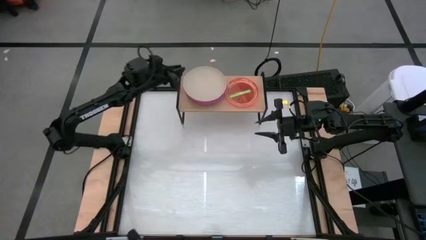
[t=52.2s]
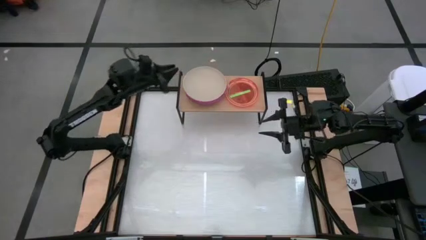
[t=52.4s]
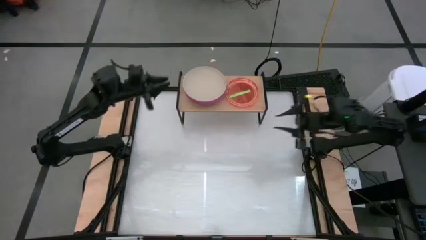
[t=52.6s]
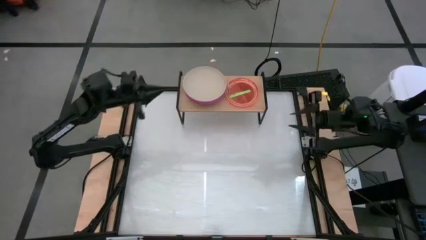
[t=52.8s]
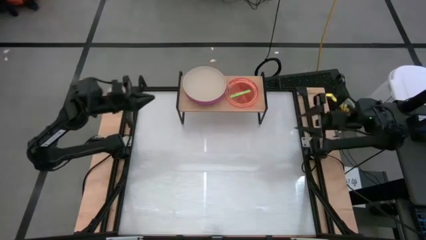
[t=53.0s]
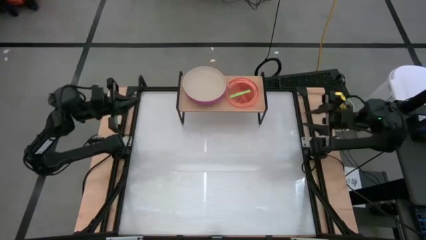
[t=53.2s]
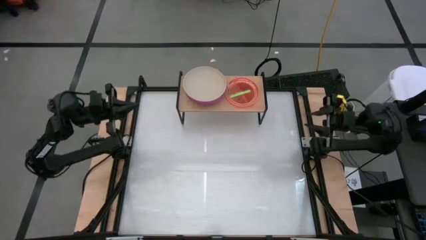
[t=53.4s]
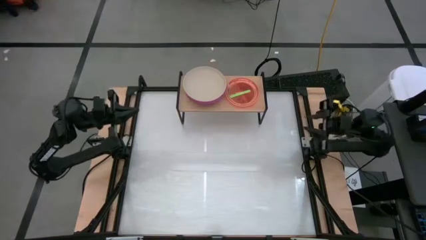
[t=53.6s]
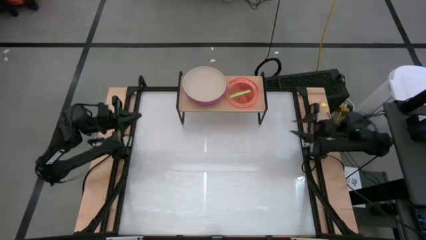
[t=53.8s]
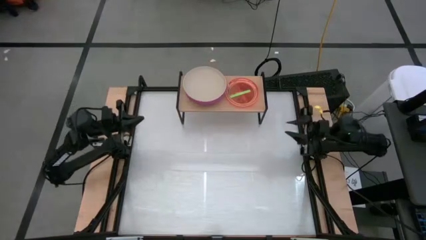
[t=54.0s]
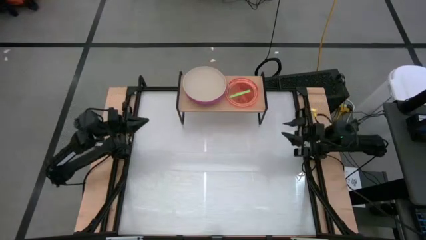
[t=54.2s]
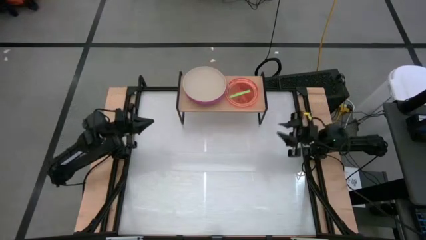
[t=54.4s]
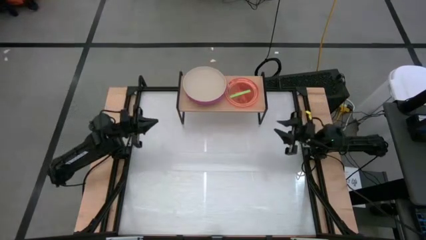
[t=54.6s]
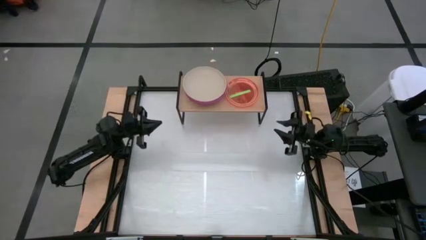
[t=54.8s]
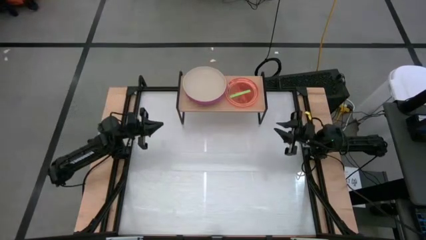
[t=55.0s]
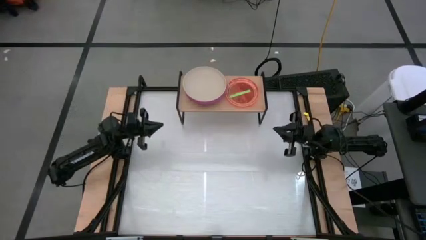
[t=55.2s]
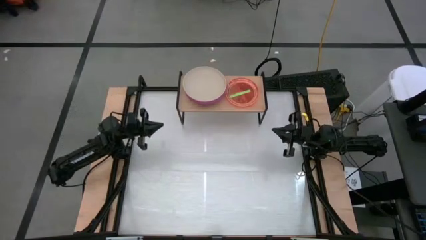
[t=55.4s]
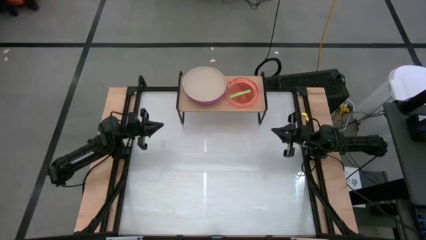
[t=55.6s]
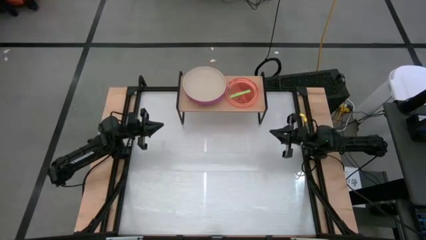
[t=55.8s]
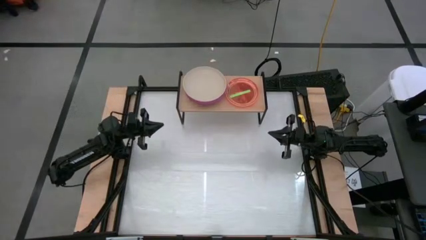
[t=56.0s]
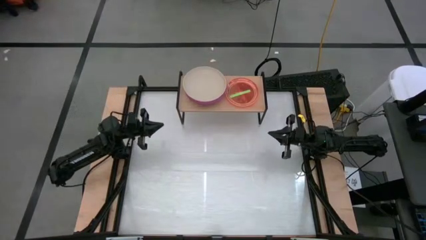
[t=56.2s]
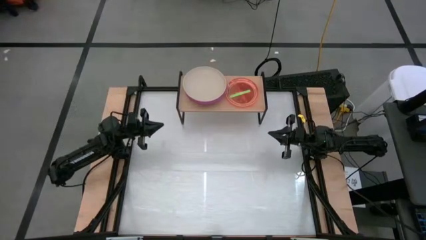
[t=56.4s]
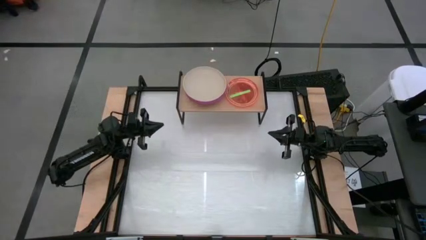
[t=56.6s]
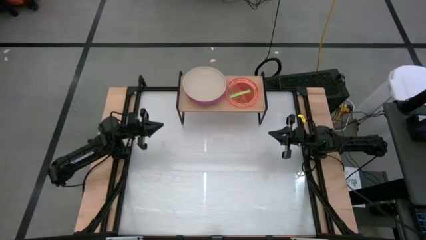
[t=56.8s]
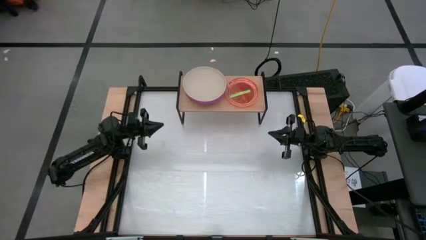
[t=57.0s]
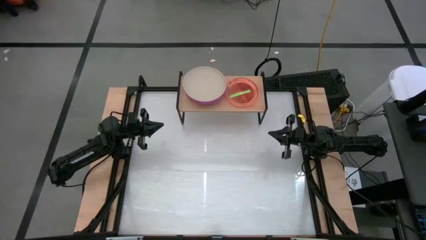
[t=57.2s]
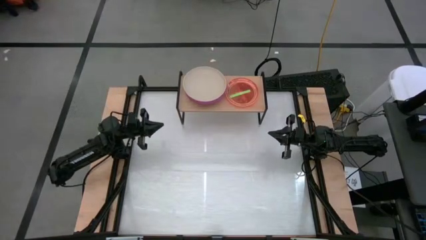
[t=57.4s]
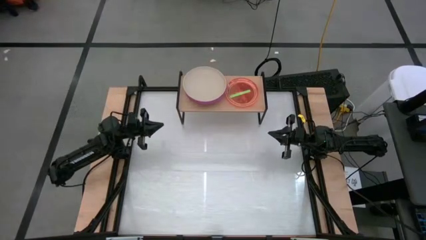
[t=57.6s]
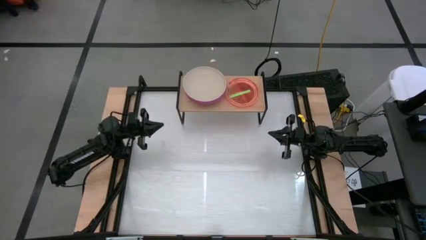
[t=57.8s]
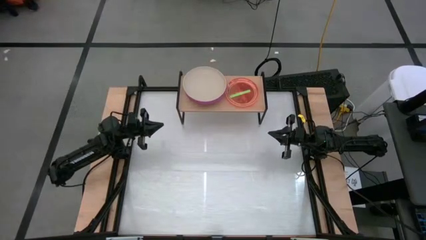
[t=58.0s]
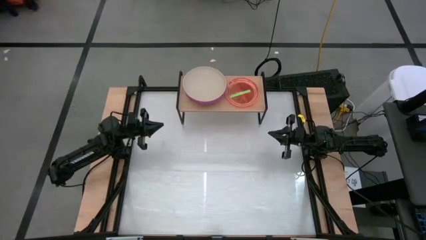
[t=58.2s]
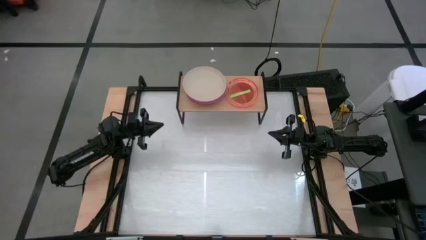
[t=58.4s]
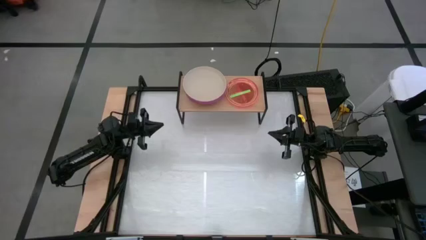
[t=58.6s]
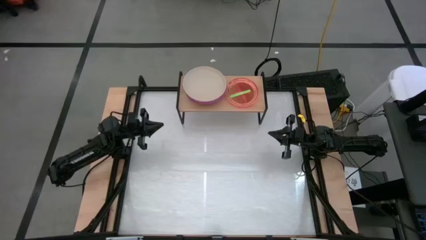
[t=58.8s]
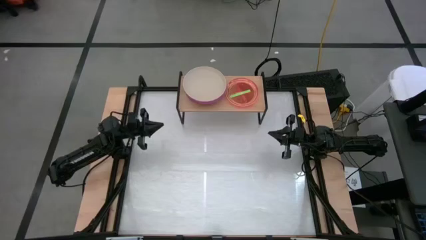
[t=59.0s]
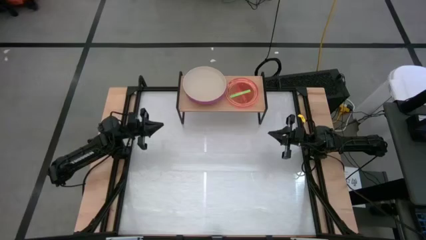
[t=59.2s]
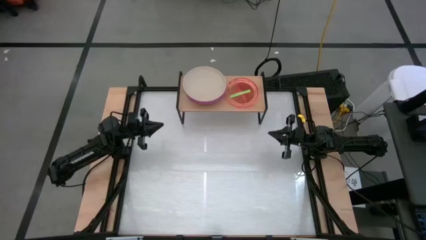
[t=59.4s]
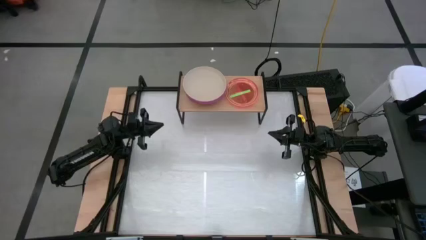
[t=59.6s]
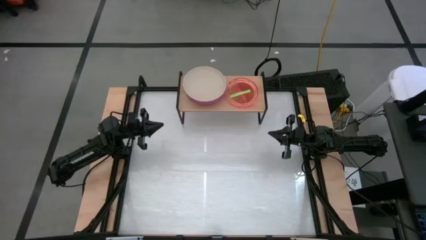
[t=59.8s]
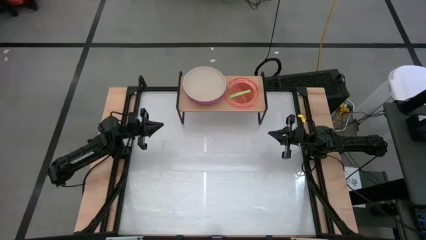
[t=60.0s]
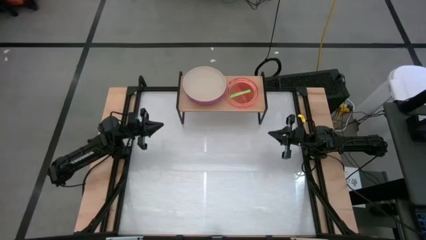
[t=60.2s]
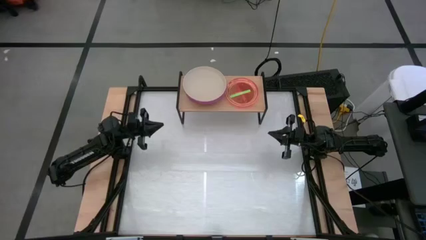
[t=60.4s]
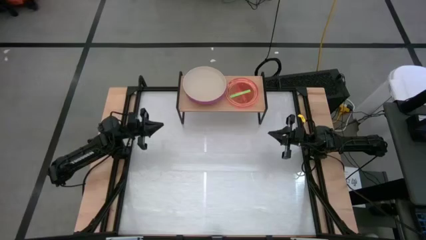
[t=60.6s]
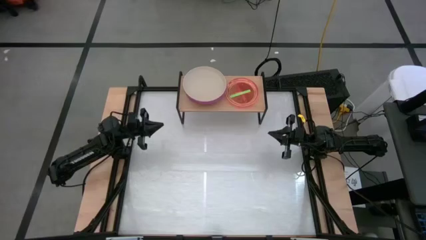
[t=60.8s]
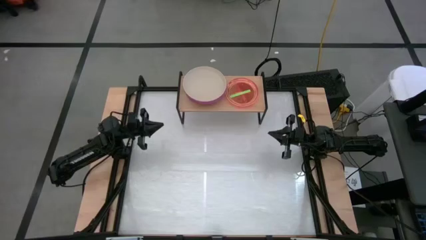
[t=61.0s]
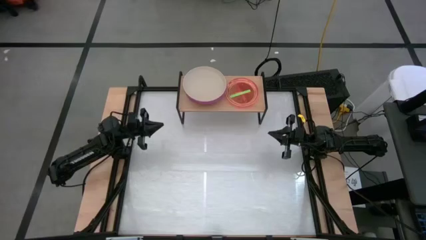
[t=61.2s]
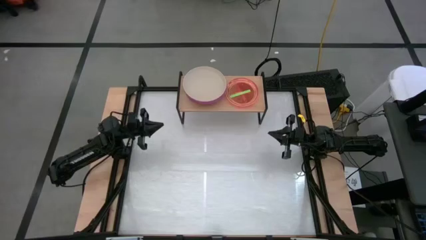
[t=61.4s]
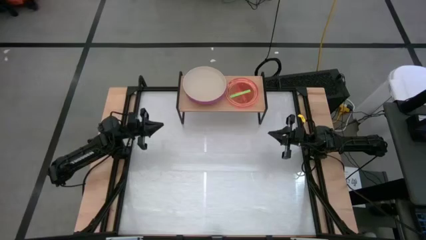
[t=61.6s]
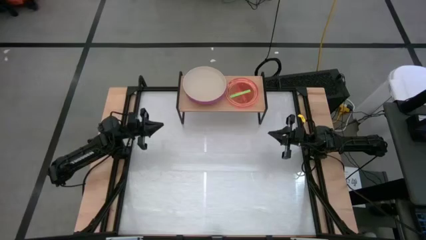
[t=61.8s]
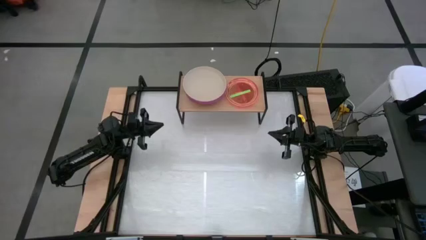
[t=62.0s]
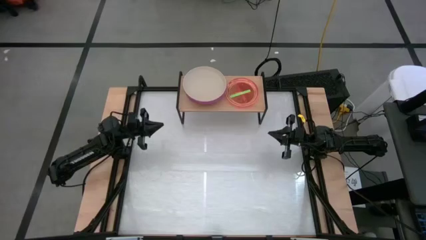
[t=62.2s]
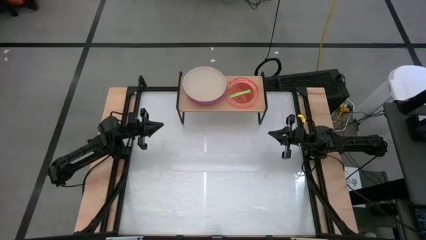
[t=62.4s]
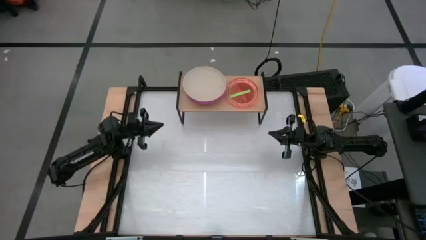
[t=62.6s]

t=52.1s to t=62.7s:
Task: Place and stack plates onto a shelf
Return to Home Position

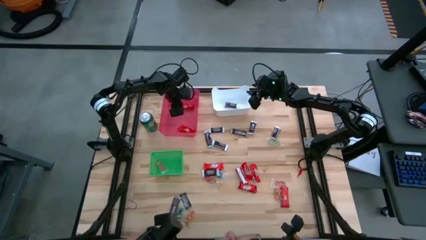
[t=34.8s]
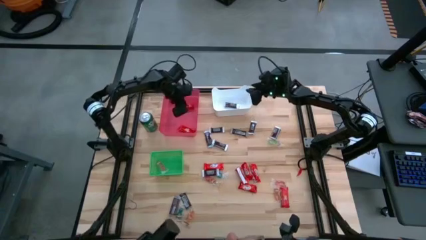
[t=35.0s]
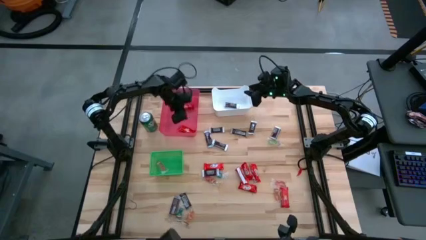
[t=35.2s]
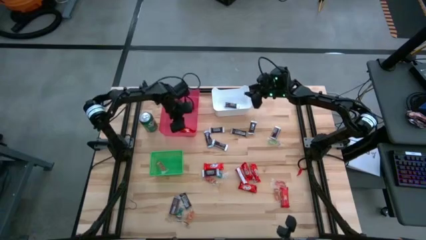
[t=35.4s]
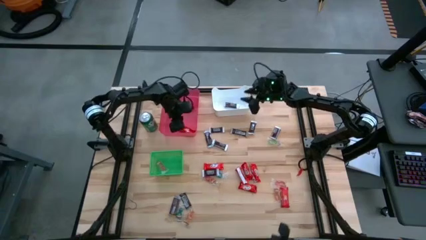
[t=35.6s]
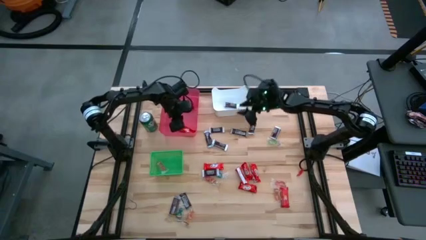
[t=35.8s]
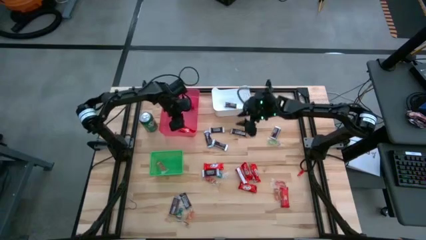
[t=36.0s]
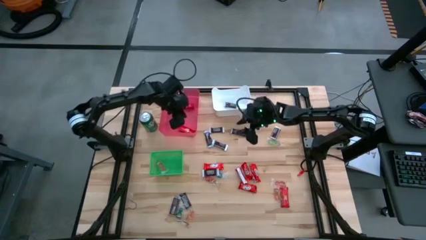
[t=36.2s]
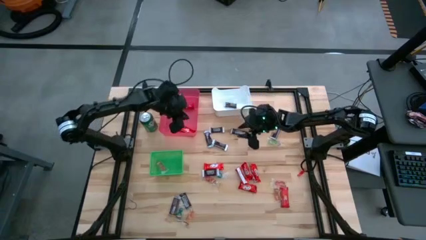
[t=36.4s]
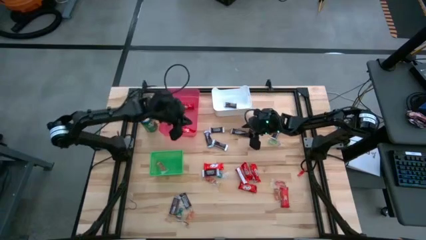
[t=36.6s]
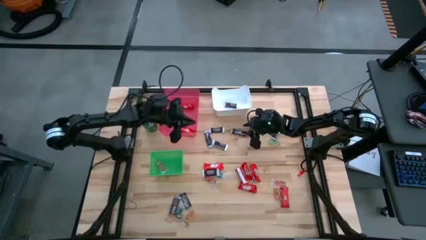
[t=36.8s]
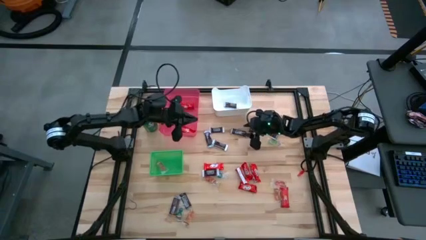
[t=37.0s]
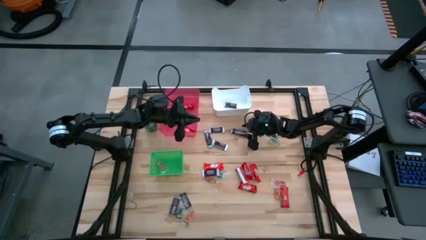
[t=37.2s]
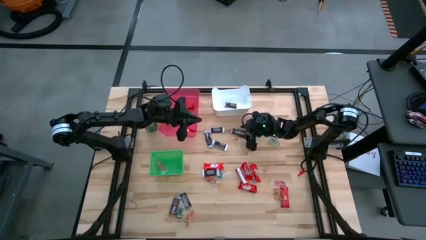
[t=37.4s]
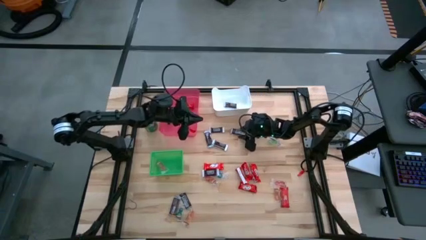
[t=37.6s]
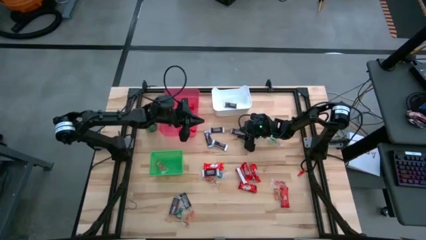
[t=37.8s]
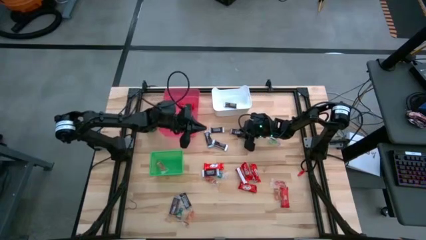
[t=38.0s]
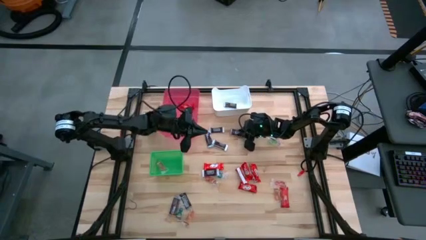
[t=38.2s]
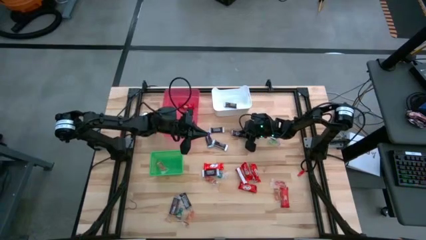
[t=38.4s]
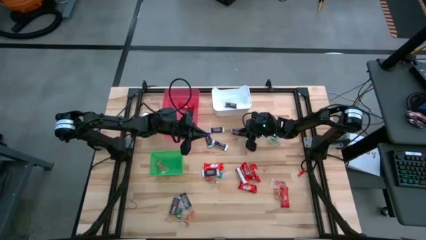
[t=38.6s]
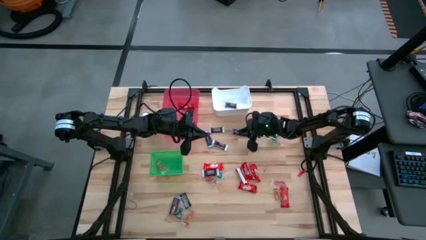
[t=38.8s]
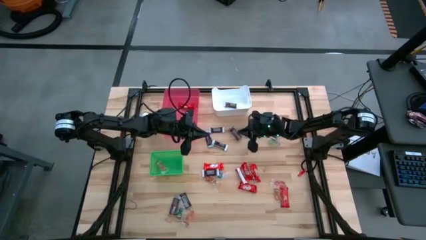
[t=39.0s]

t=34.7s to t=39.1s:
Task: Organize candy in baskets
Put the brown chocolate into the white bin
